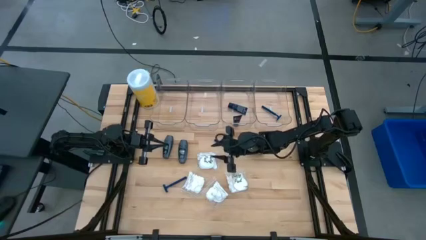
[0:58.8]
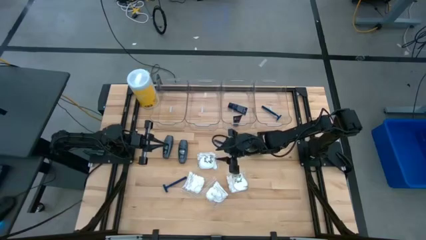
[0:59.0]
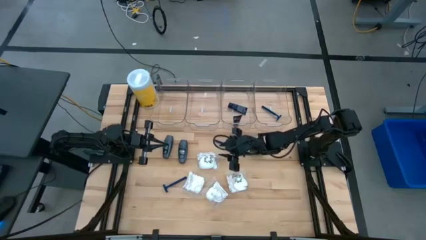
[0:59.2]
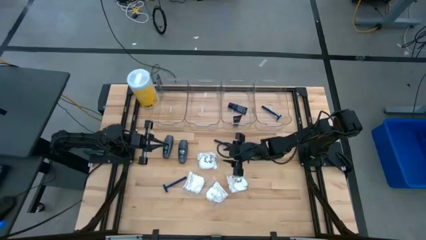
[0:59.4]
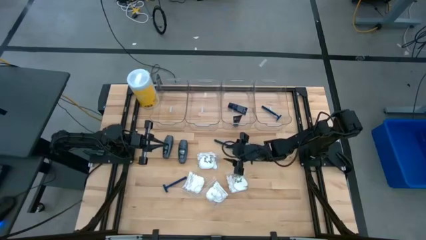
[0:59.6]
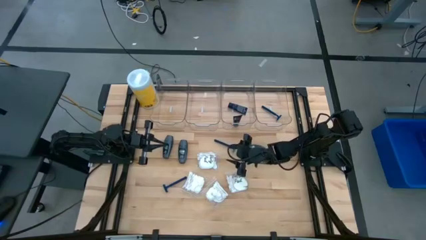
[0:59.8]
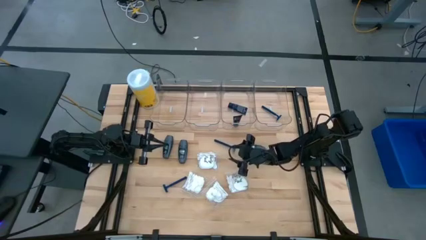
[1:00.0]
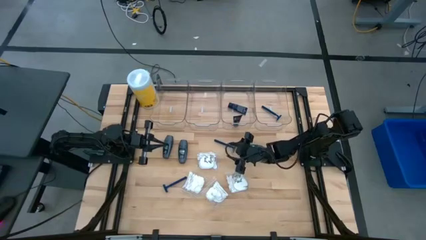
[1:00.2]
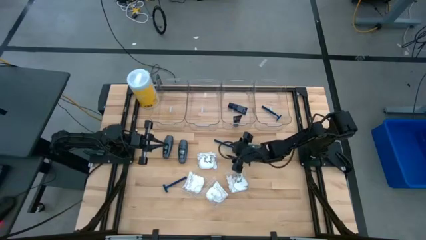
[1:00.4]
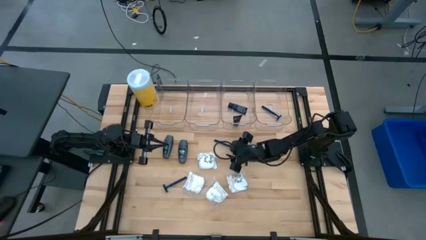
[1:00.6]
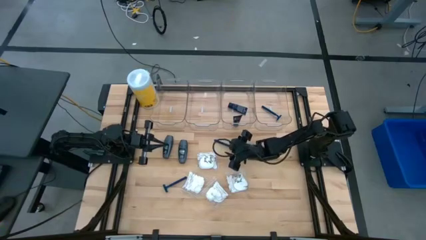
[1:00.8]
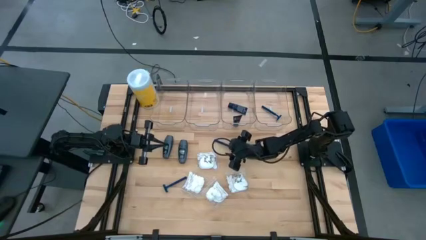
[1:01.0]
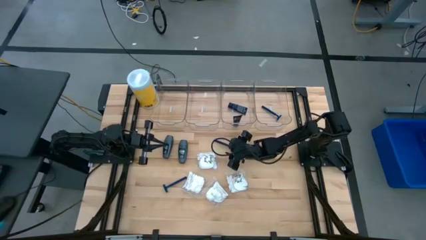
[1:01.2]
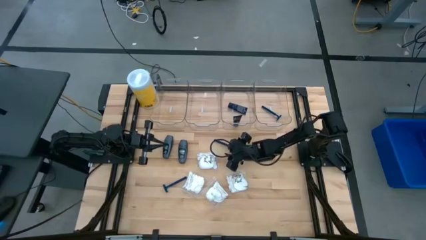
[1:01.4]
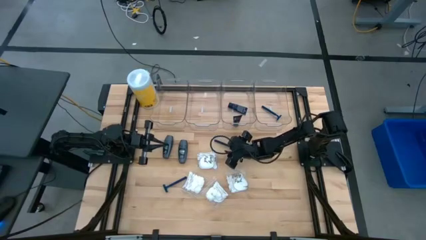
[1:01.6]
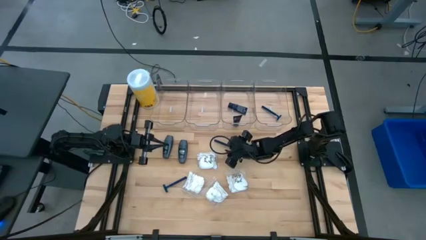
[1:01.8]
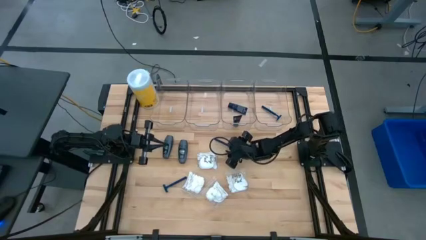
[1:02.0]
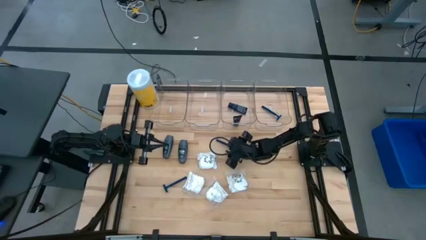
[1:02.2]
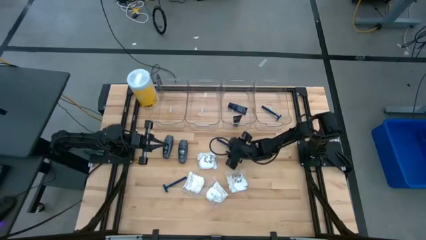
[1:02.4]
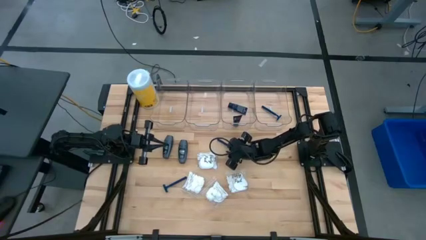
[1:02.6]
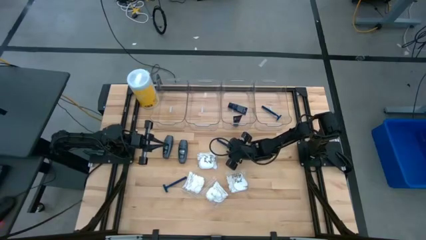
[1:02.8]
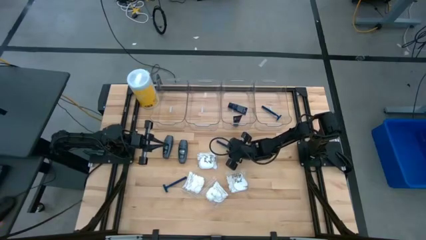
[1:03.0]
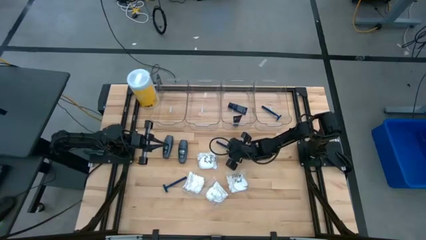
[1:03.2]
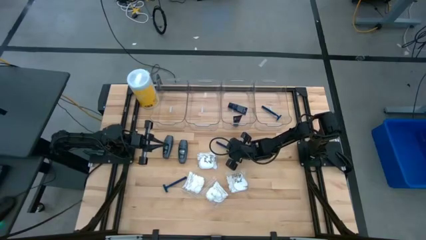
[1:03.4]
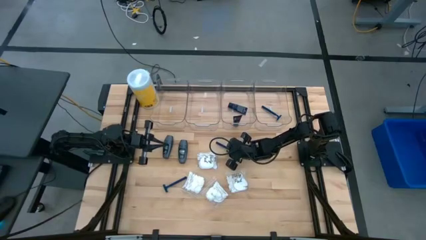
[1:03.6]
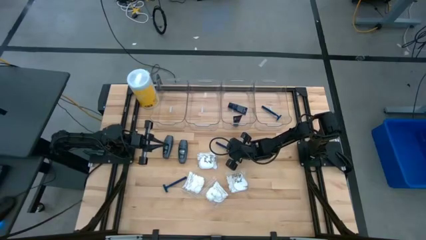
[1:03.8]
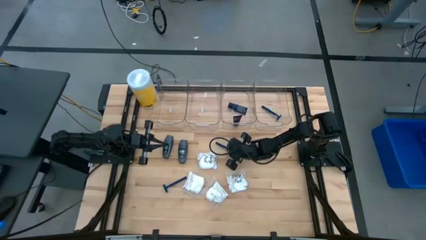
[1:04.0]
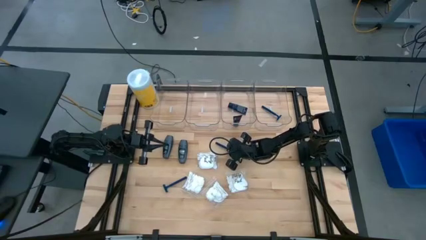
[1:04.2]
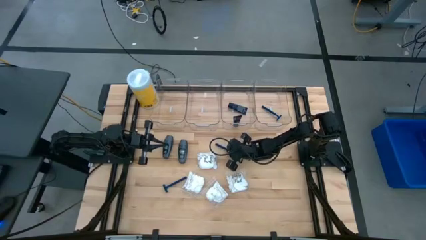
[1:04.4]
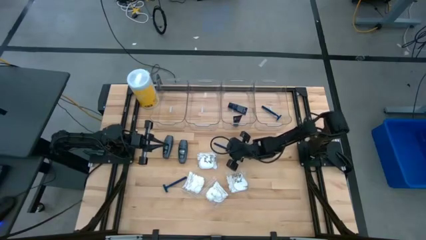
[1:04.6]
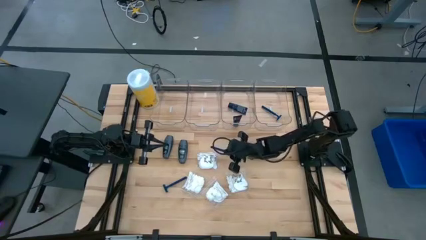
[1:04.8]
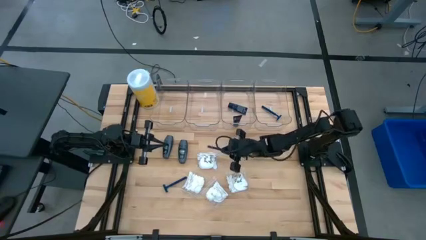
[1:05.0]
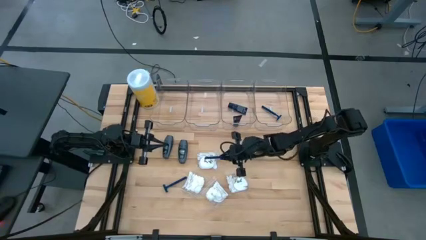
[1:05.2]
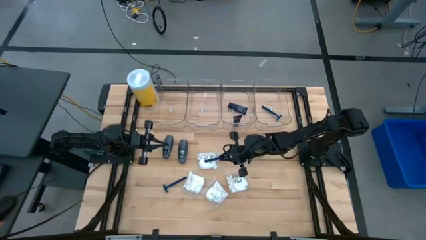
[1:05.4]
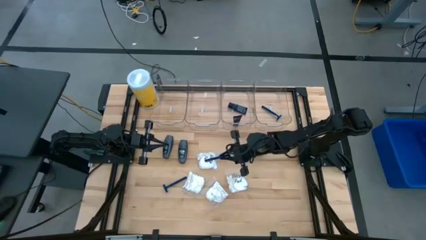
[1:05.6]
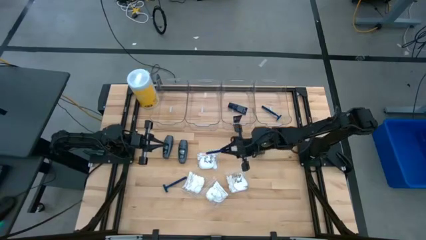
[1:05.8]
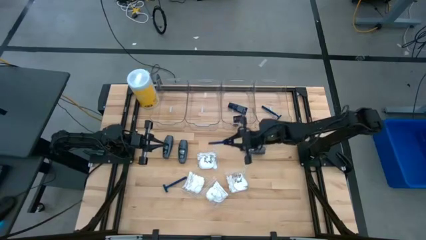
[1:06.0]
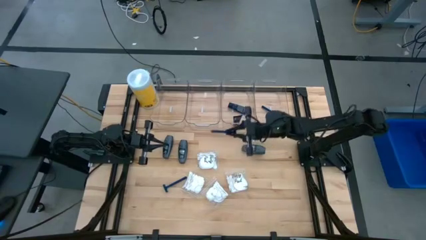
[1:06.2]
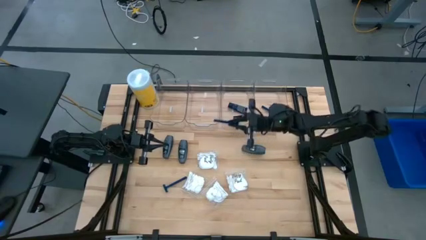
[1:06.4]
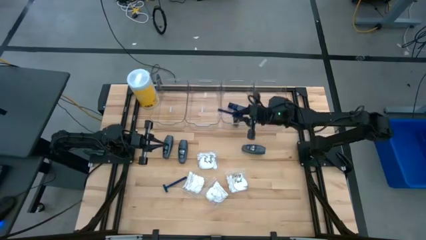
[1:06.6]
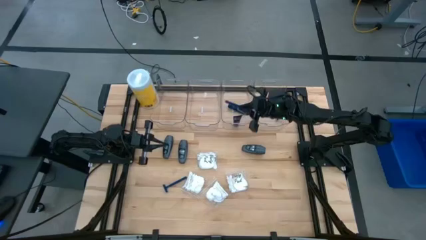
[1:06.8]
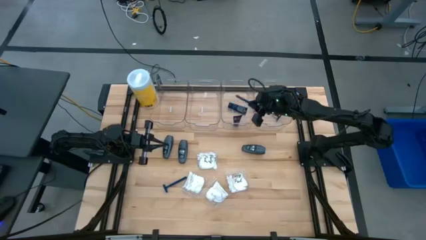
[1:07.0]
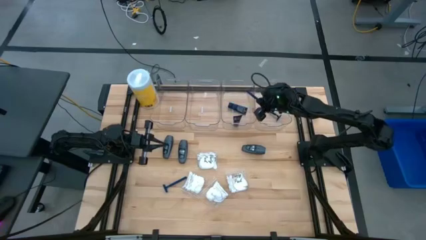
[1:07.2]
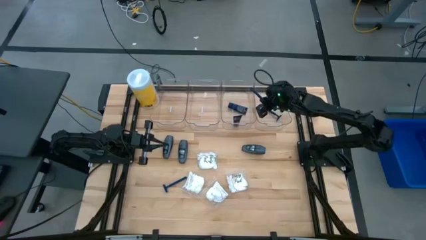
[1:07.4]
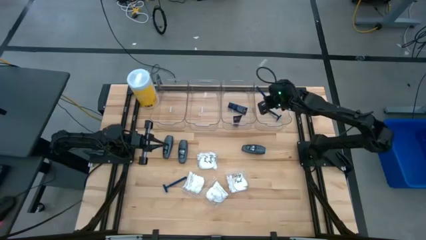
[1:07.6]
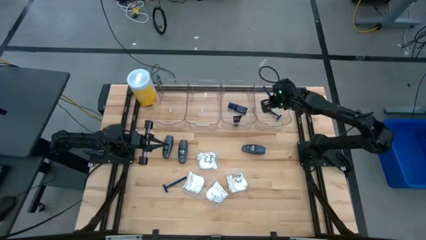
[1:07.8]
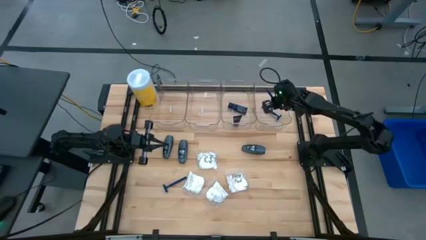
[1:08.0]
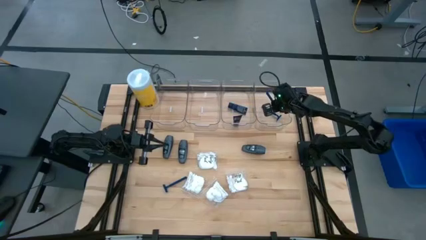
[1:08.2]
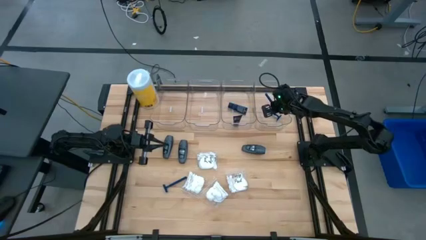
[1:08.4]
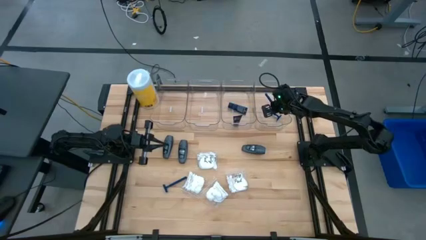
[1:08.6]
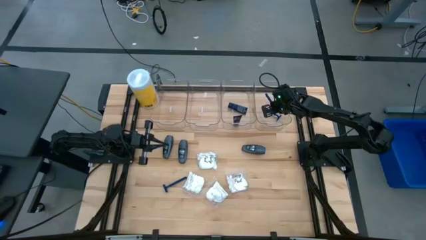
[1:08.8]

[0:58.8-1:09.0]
Task: Pick & Place Travel size toiletries
Put the blue razor into the right transparent bin

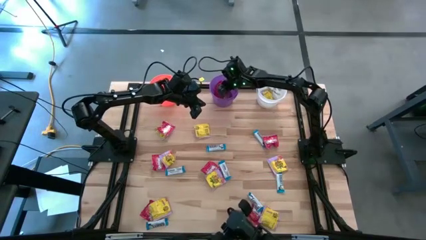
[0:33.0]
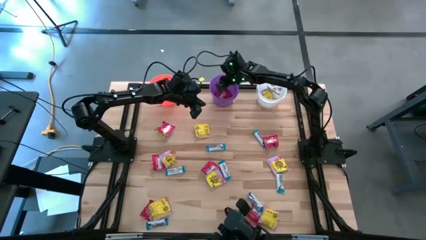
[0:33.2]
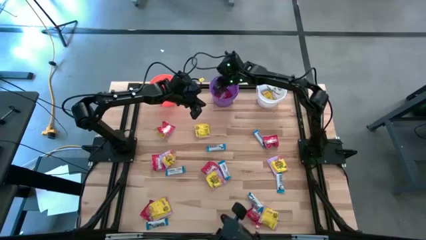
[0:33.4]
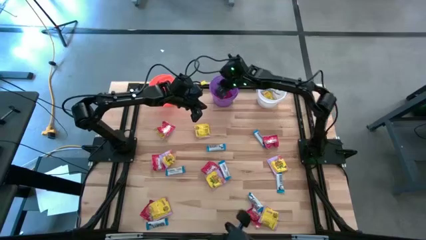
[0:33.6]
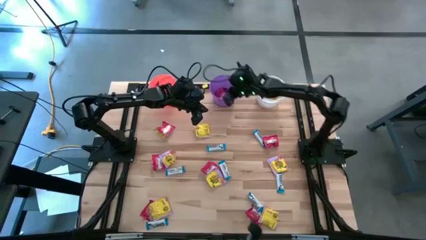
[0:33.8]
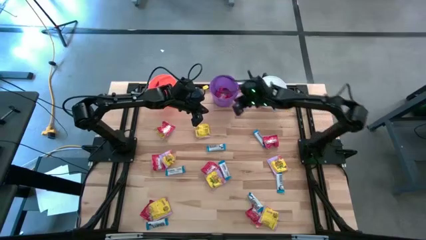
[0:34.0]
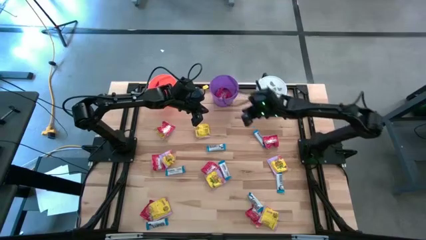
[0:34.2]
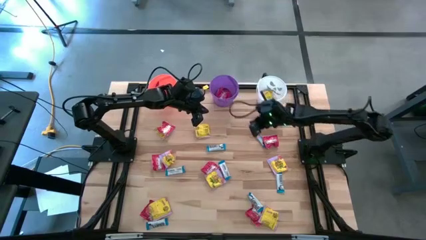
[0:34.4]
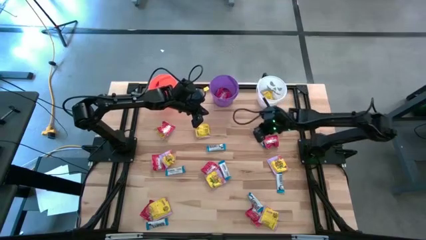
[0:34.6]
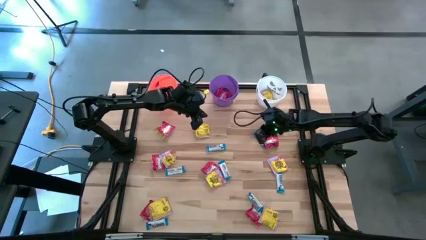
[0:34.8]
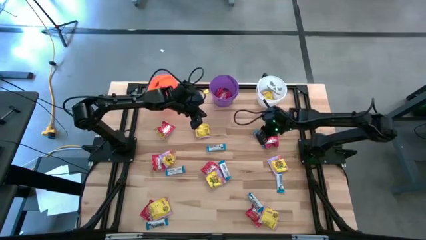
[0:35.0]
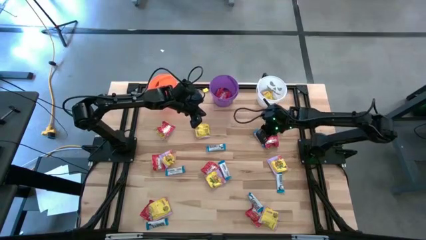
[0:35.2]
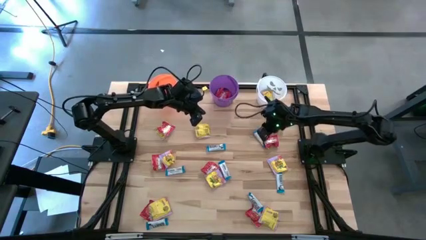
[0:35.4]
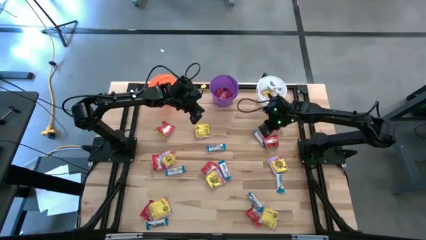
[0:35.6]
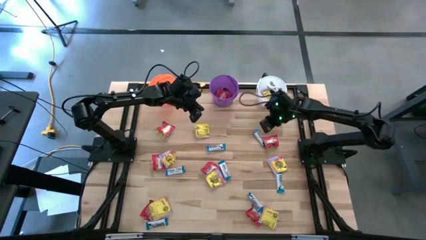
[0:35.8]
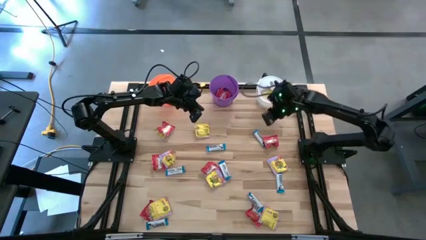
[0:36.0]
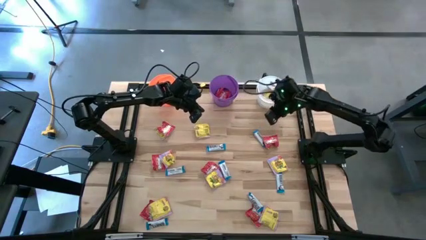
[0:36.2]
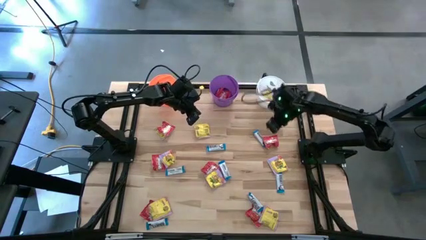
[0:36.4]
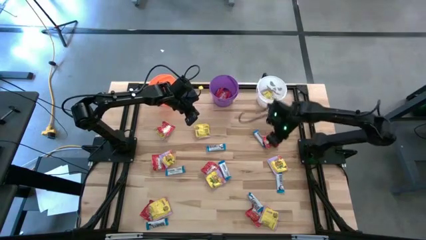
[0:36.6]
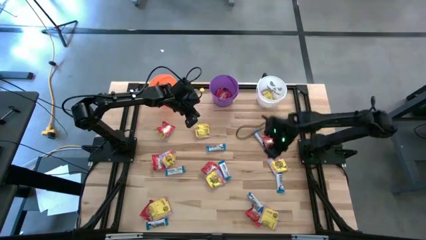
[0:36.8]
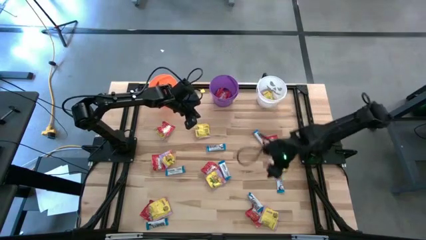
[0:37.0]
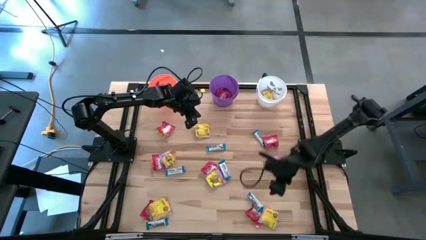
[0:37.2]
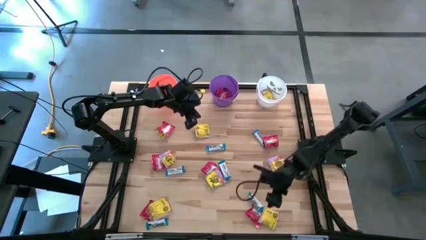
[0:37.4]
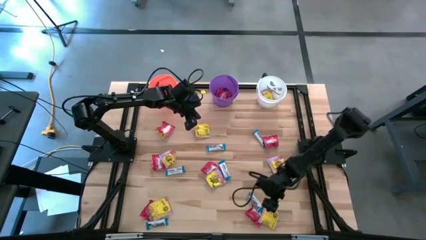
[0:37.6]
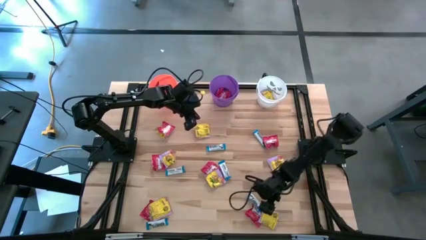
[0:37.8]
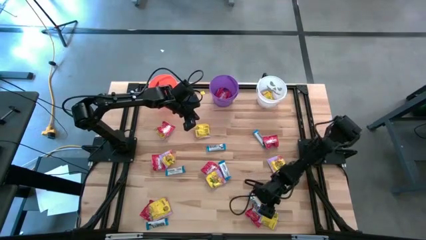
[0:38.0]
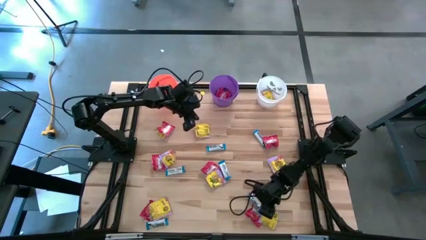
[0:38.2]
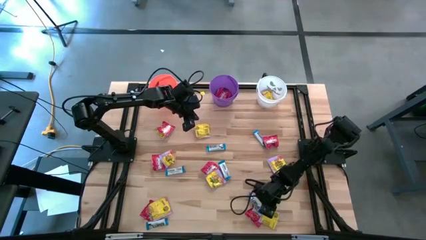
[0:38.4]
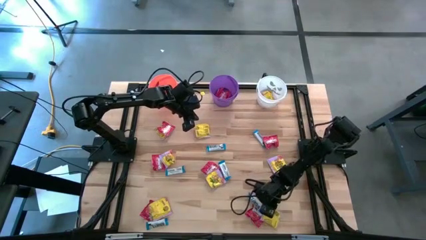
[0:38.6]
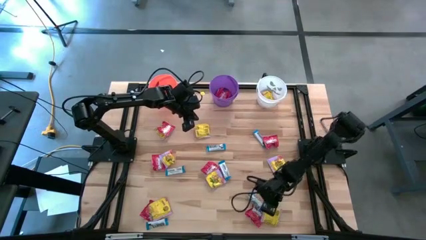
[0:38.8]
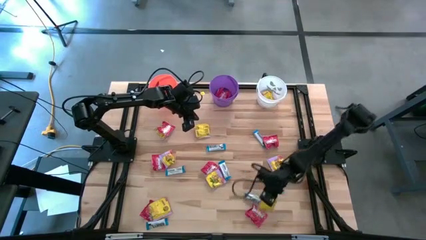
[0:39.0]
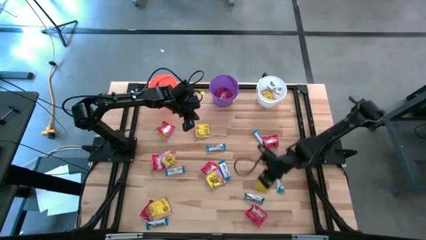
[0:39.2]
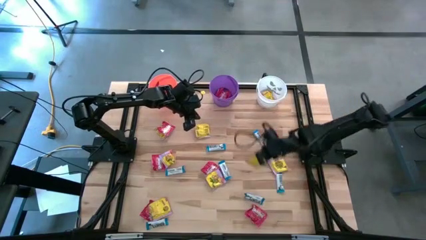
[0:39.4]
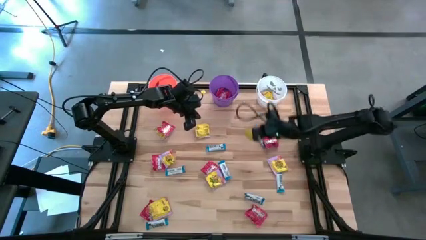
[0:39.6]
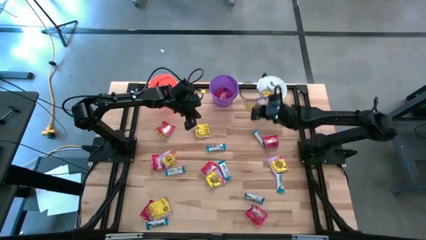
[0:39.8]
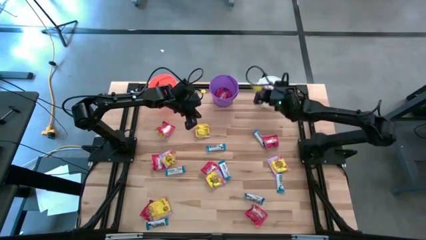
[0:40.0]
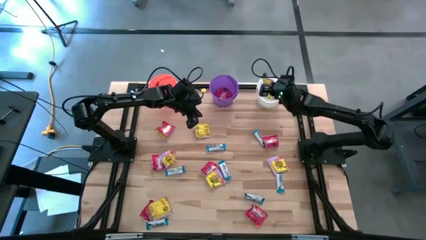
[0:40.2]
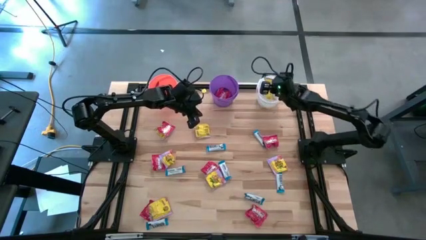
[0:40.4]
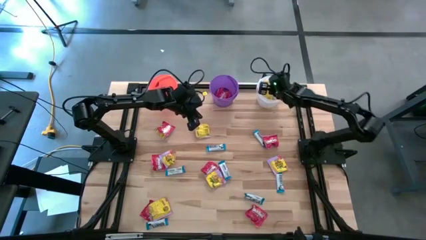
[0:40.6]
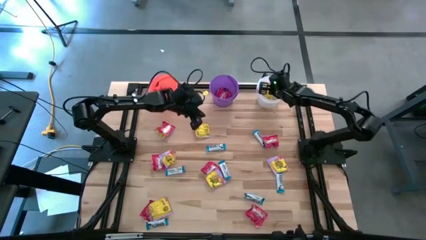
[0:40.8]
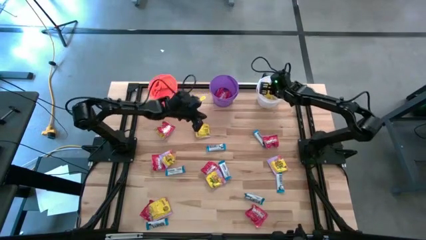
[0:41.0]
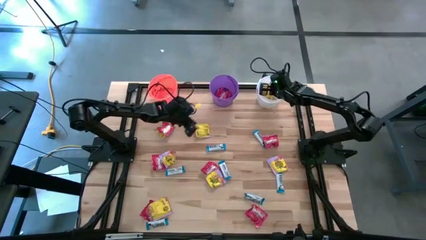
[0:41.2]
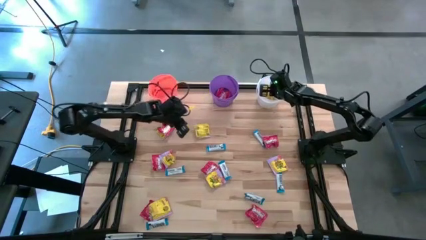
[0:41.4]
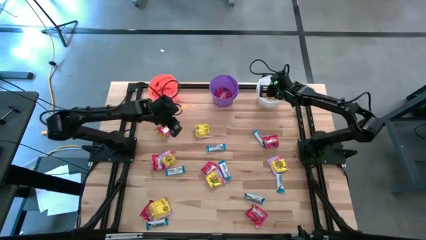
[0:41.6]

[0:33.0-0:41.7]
Task: Sort candy
Put the yellow candy into the white bucket
